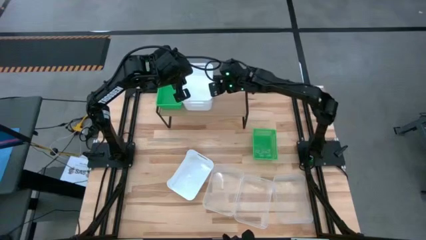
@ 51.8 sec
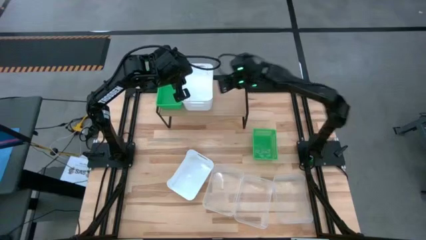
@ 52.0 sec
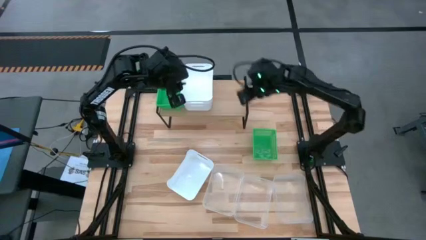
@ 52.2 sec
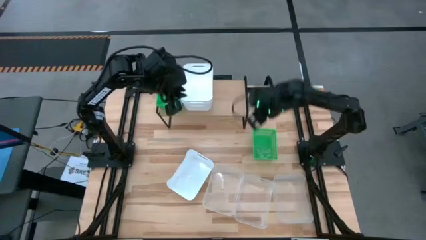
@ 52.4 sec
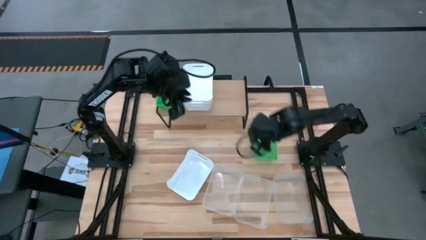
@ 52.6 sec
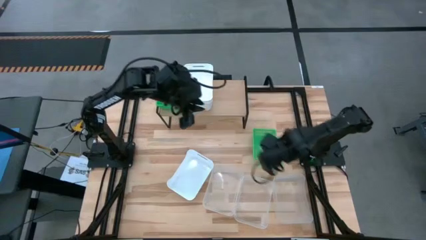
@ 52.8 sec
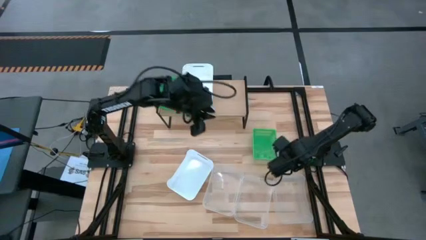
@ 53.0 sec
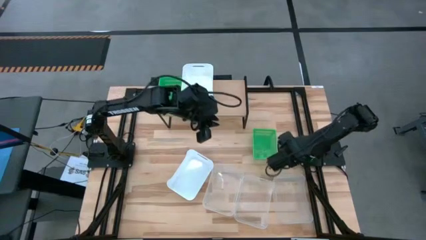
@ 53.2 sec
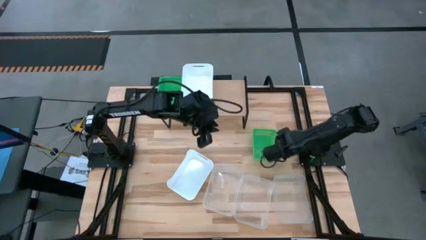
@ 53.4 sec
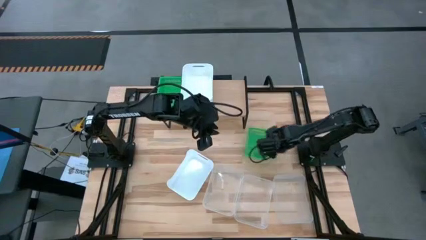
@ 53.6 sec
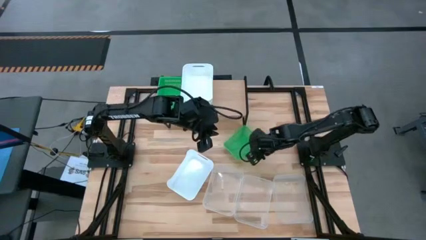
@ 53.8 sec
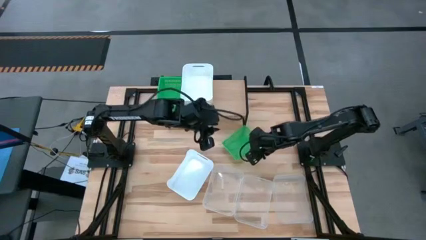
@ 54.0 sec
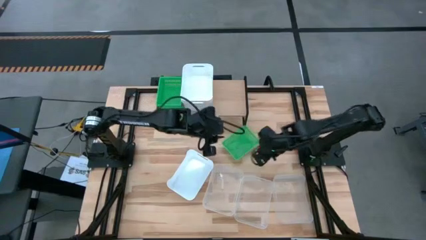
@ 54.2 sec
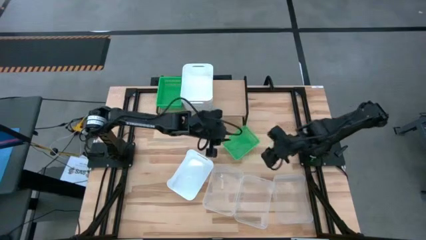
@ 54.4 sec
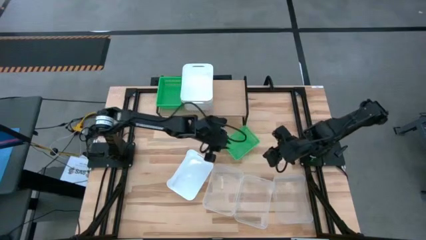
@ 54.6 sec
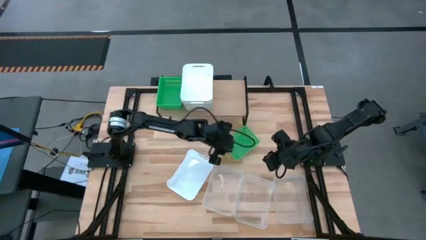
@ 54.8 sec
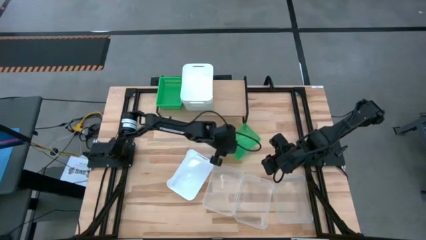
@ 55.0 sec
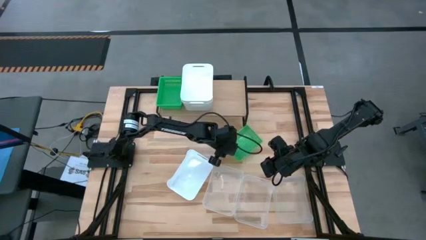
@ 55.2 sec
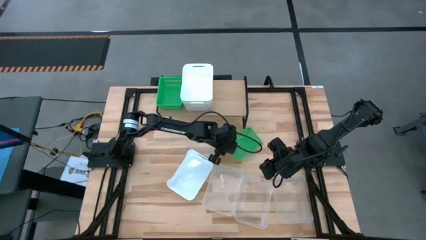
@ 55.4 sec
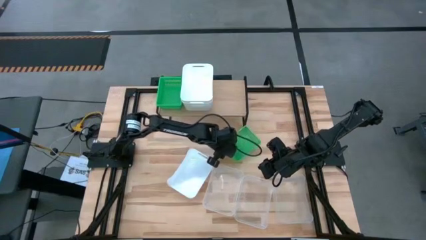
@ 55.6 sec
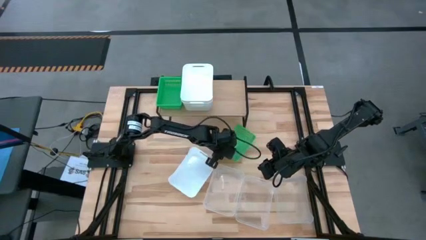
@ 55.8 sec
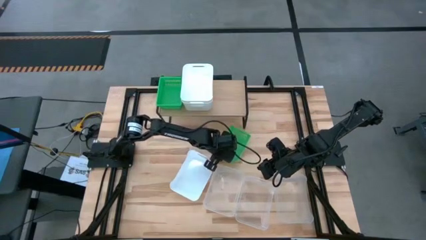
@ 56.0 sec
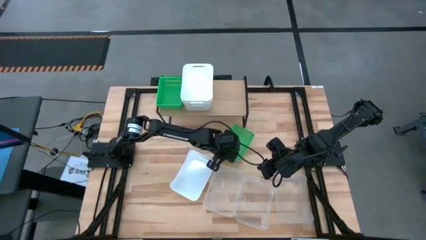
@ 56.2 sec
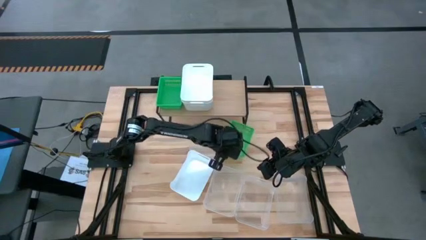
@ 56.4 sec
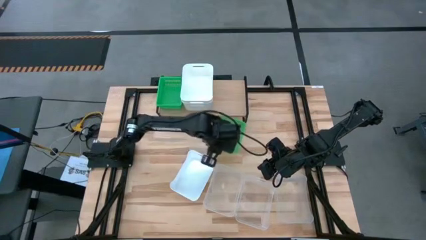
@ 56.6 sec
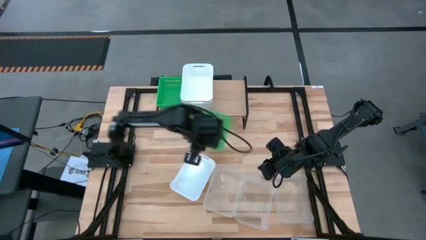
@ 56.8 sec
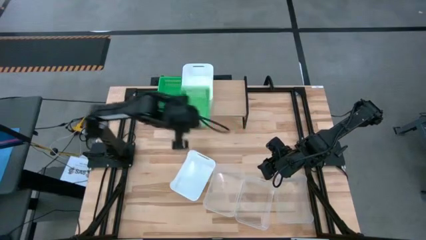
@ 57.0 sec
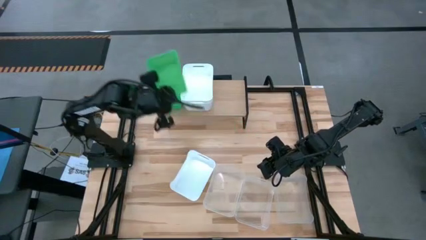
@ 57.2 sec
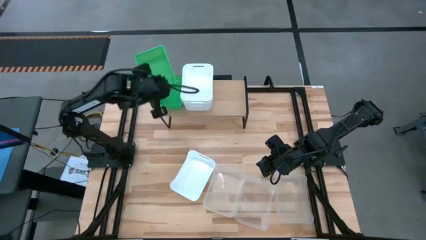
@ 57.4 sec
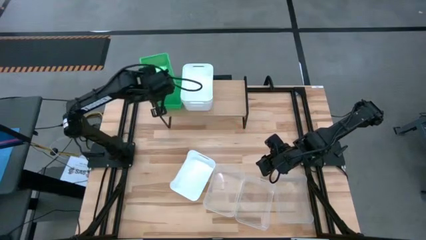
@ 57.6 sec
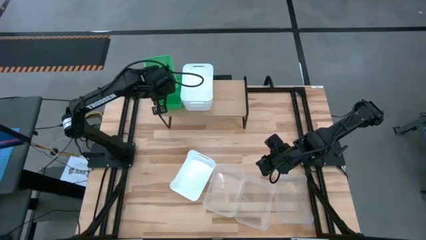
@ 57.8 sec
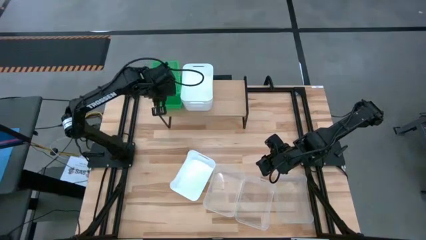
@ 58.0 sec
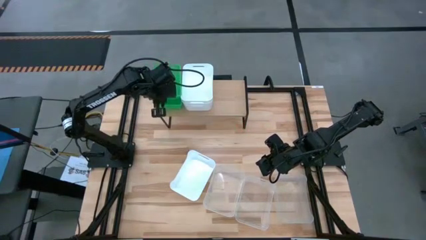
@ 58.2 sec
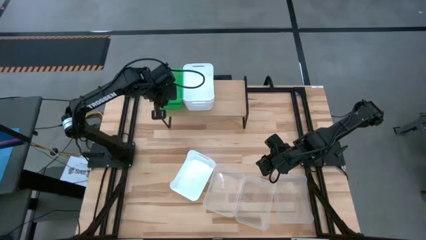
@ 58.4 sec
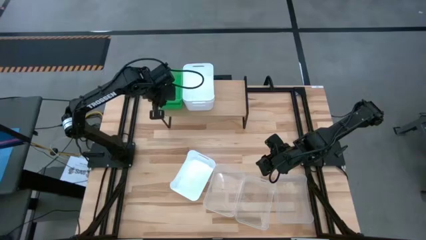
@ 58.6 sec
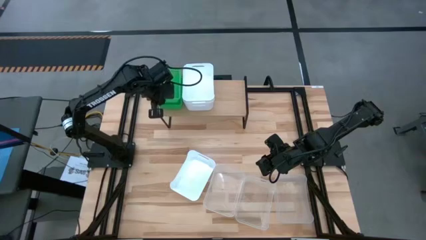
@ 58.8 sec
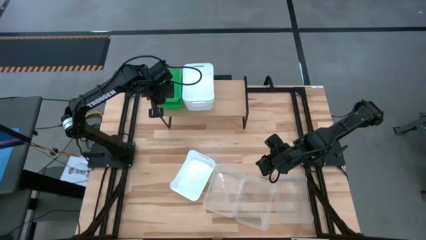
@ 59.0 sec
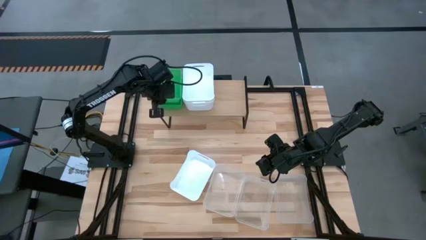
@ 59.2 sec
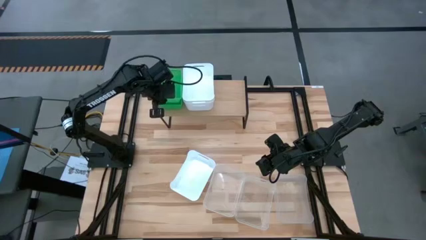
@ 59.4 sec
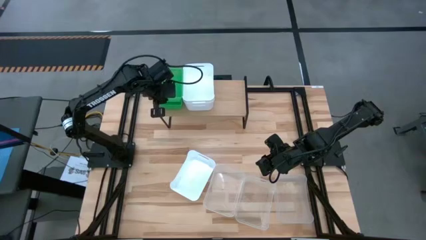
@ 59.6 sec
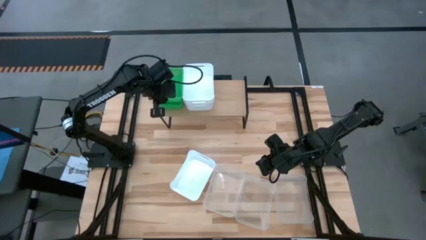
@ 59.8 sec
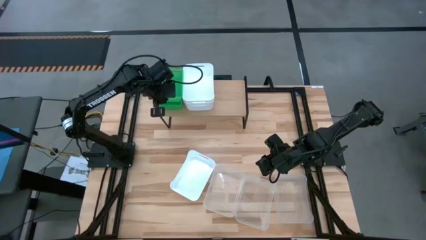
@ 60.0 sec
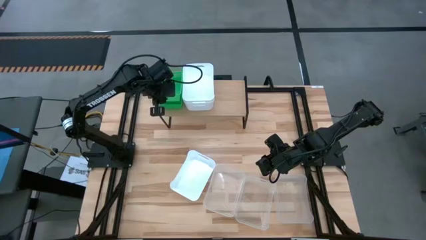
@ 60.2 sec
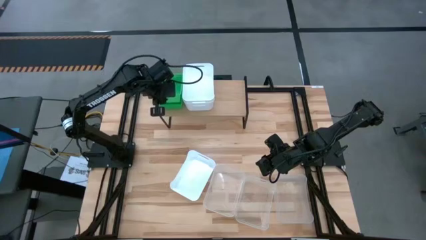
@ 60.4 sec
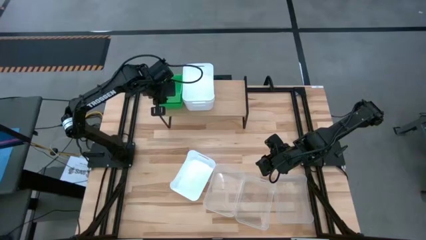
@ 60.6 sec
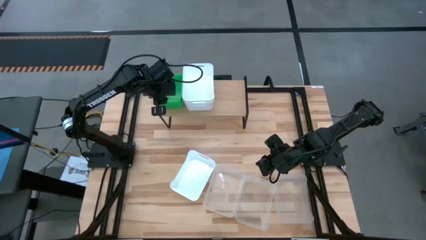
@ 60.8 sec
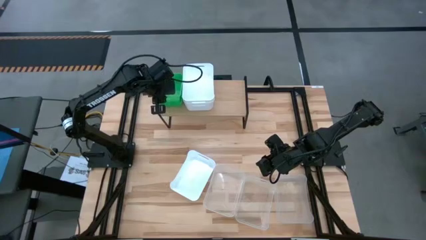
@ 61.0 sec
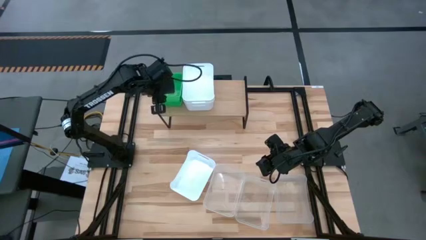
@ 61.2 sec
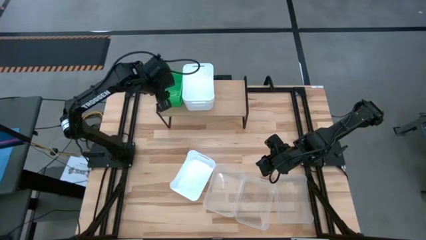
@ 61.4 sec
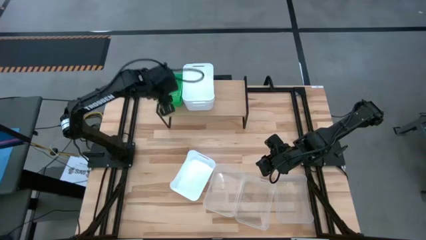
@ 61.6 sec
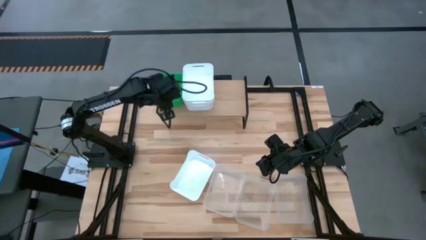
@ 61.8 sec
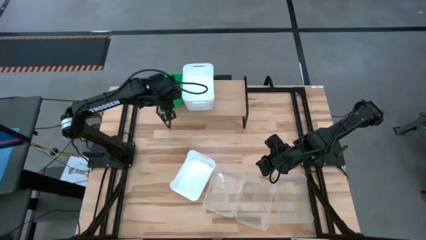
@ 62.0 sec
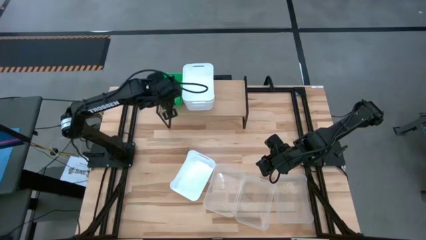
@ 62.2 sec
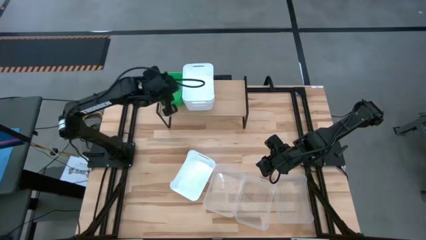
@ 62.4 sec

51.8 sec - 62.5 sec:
Task: Stack baskets on shelf by color
Stack the green bin on top of the green bin on the shelf

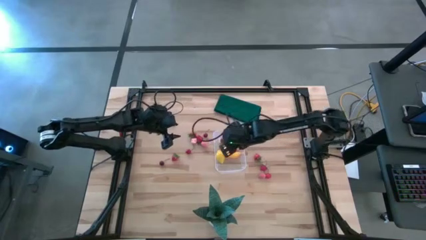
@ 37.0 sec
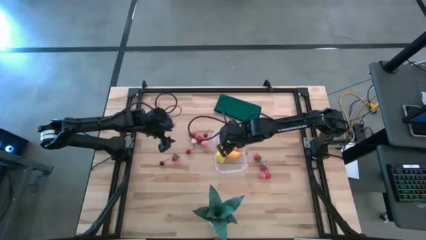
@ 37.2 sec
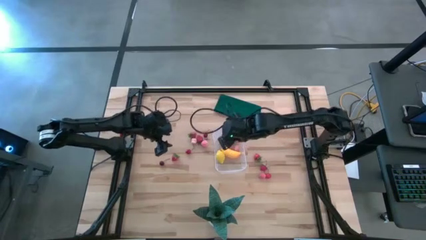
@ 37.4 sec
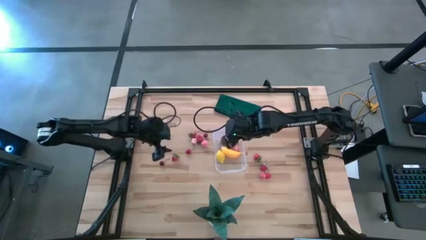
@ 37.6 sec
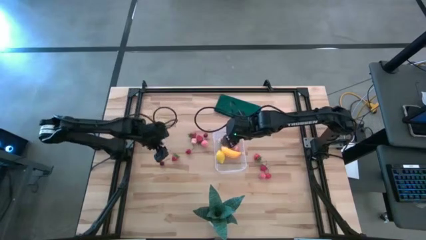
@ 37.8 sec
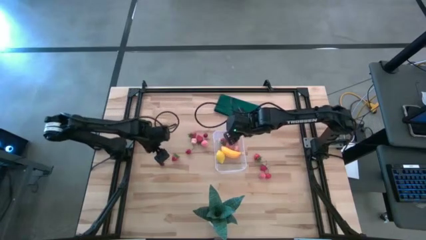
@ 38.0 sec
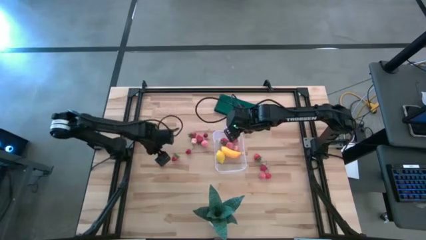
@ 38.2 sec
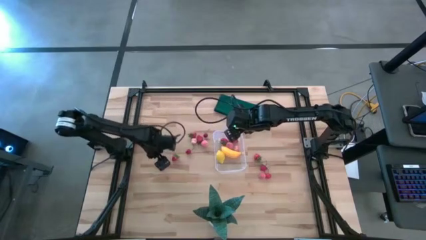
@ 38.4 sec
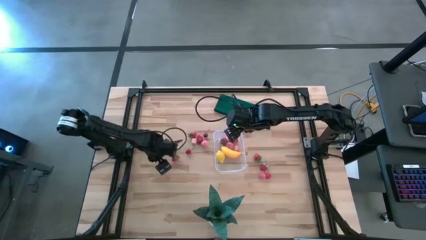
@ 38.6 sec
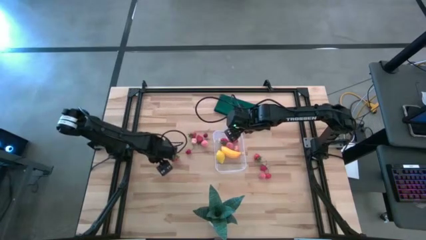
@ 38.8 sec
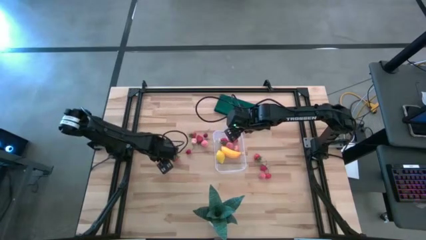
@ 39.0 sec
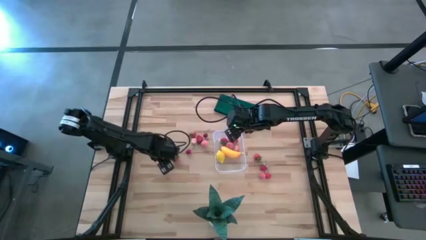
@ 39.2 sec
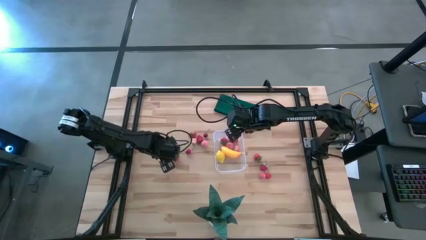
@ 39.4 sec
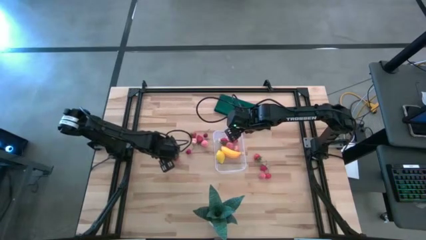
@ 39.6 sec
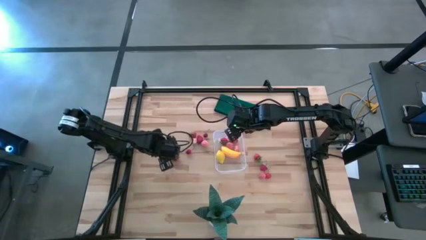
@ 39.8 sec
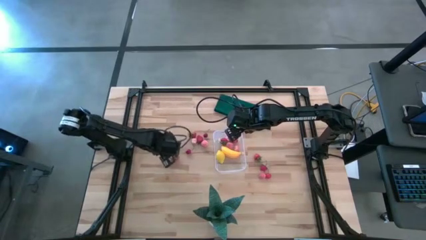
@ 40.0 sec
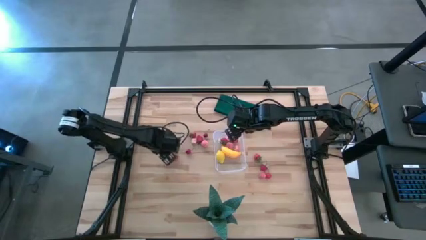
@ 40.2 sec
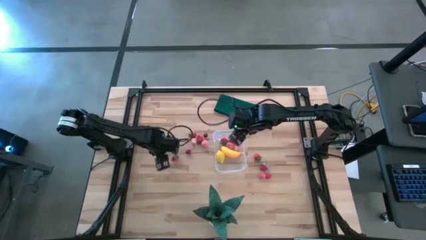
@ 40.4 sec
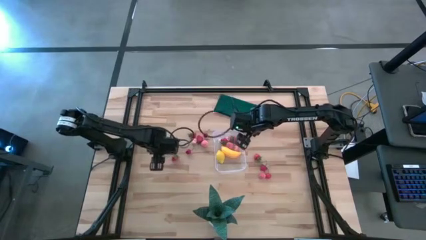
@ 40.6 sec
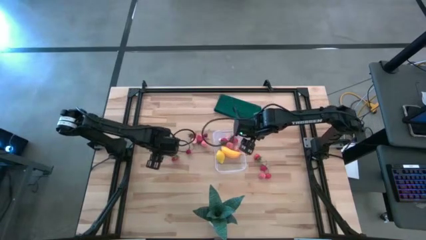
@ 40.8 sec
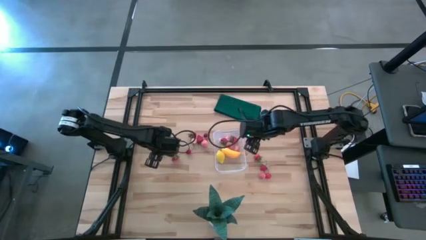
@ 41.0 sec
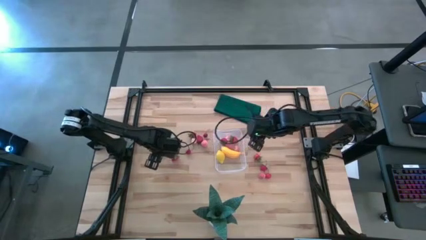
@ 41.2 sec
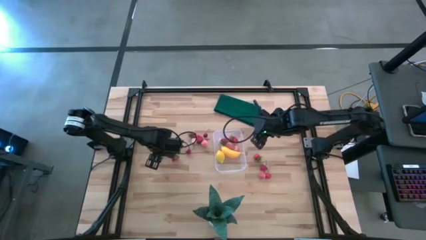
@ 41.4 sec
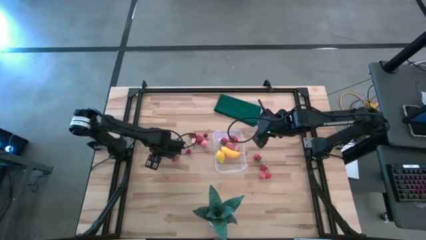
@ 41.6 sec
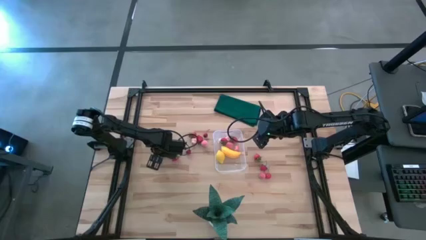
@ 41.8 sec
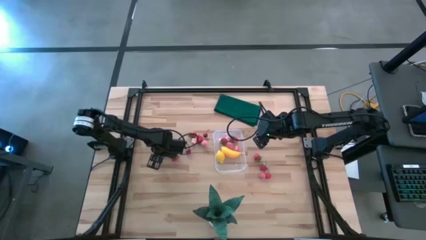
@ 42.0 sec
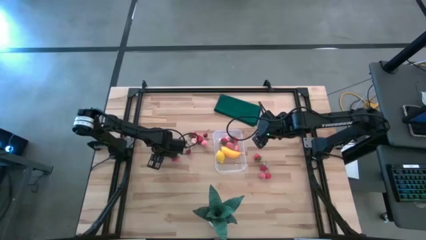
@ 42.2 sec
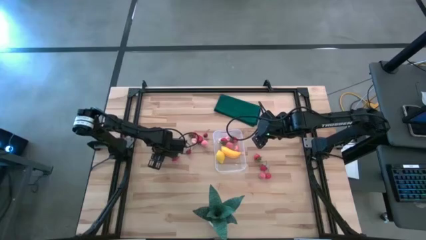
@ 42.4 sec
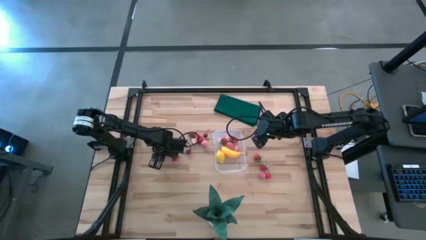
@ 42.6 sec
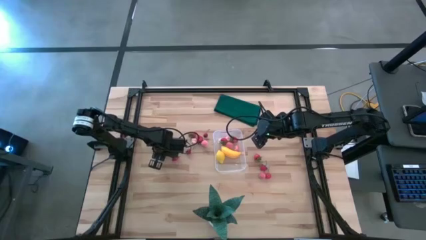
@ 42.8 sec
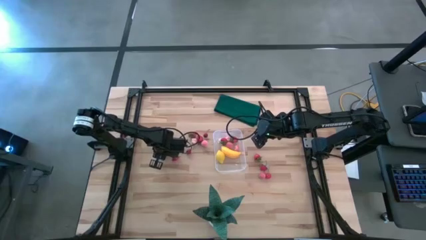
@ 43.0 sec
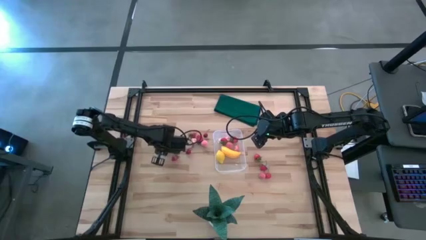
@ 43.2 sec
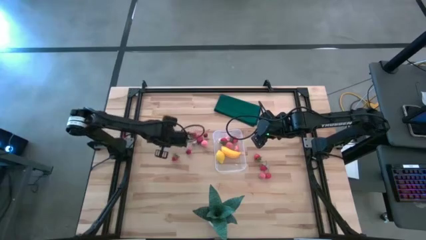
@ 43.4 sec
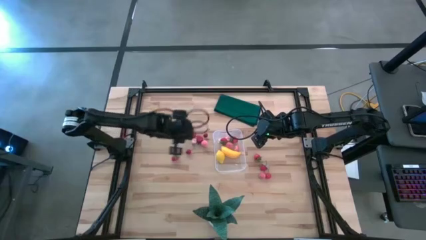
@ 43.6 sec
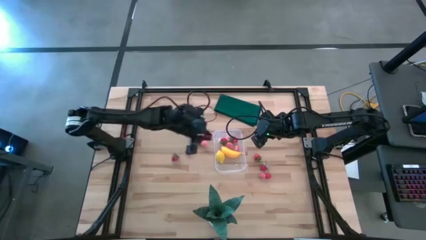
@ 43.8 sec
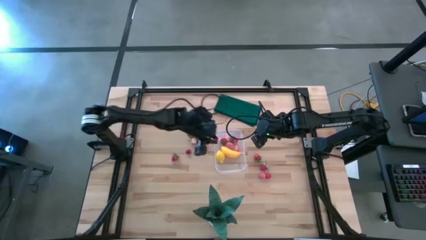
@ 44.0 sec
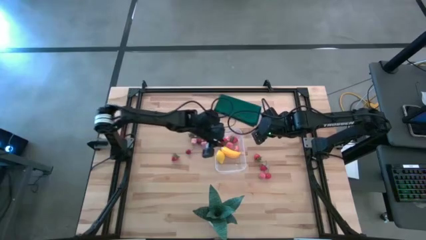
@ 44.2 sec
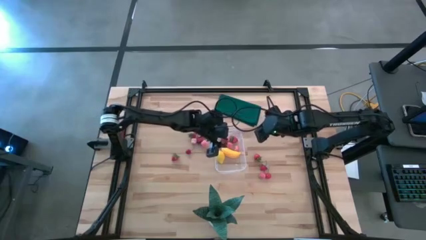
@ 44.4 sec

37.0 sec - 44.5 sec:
Task: Pick and placing Produce into tupperware
Put the cherry into the transparent bin
